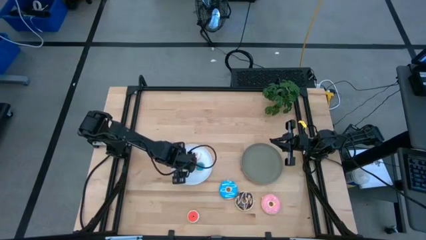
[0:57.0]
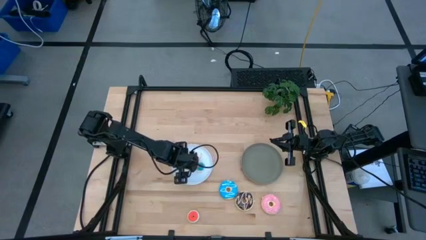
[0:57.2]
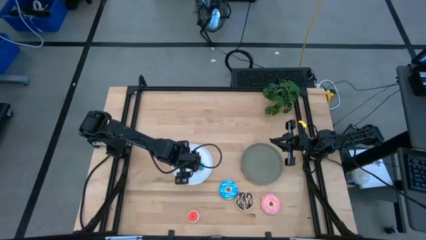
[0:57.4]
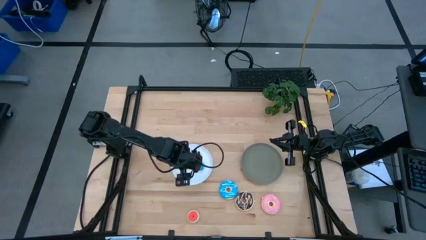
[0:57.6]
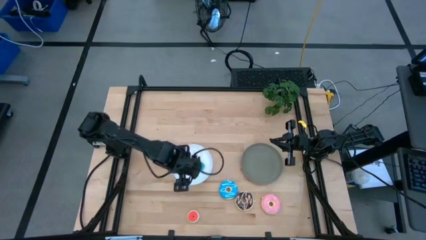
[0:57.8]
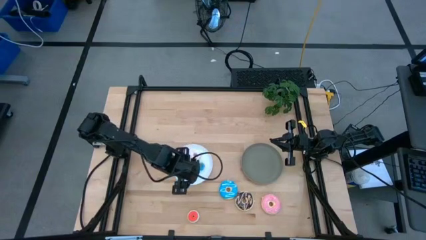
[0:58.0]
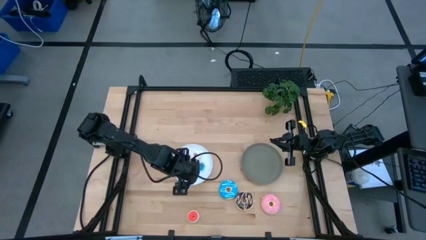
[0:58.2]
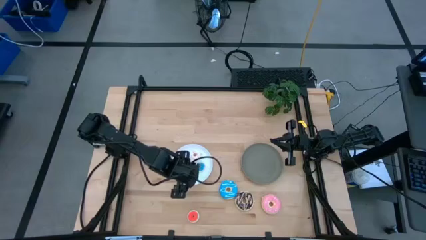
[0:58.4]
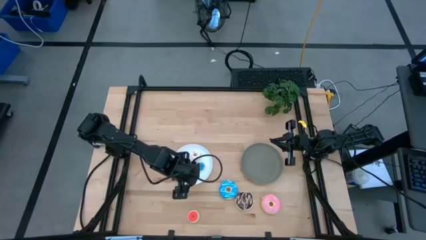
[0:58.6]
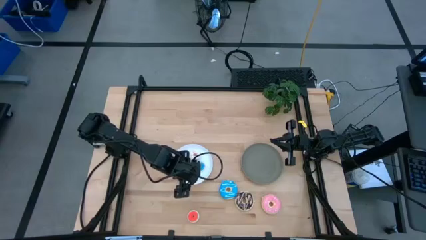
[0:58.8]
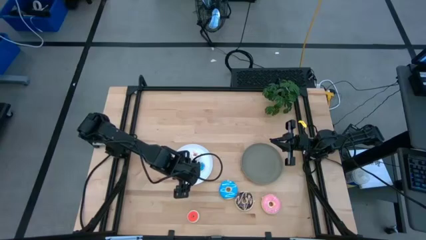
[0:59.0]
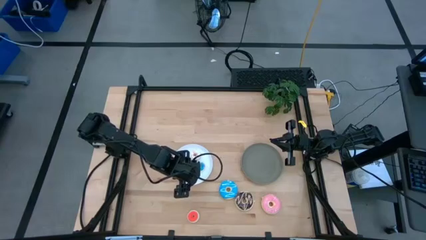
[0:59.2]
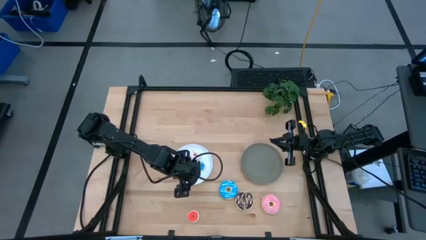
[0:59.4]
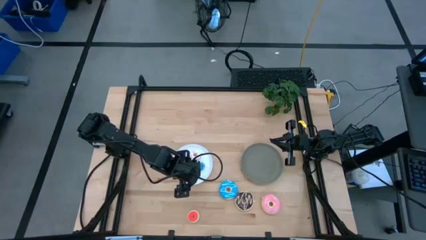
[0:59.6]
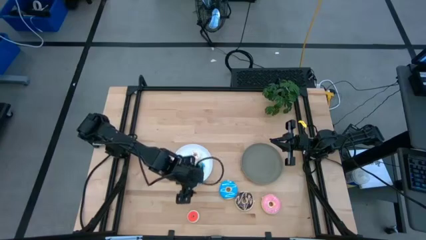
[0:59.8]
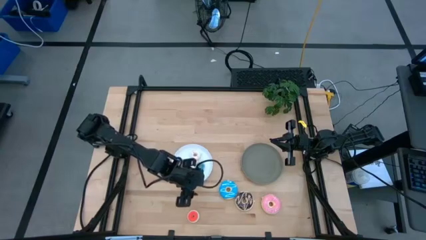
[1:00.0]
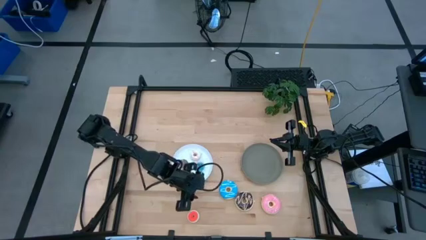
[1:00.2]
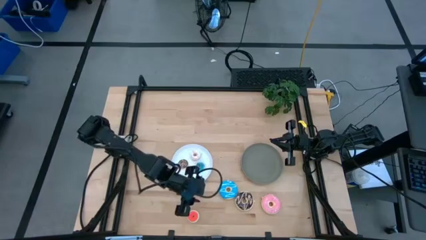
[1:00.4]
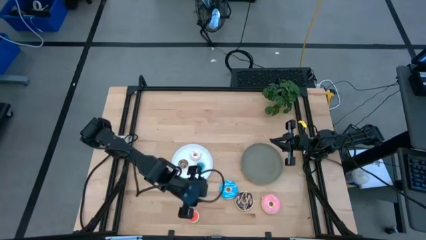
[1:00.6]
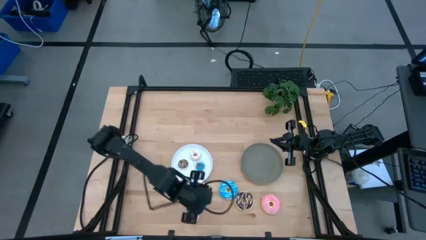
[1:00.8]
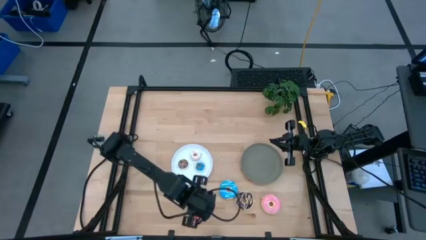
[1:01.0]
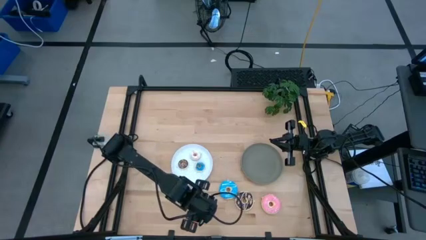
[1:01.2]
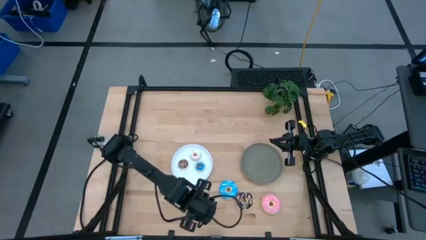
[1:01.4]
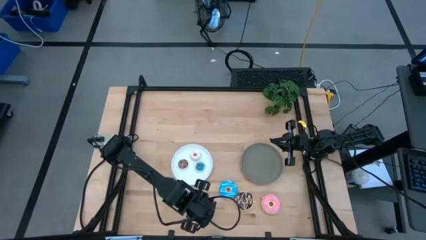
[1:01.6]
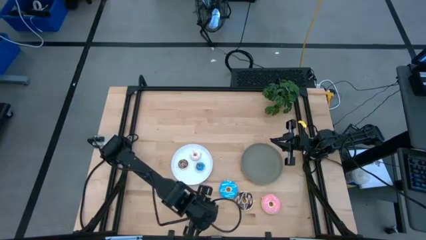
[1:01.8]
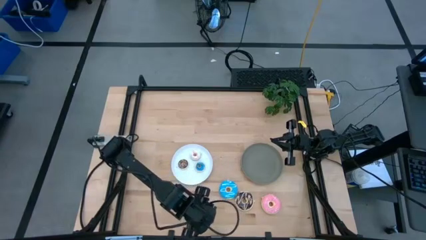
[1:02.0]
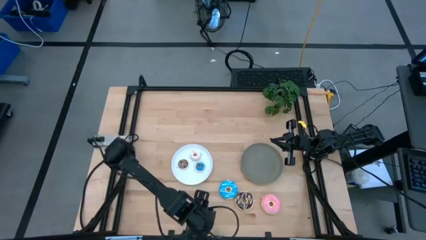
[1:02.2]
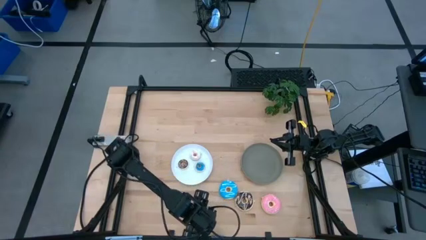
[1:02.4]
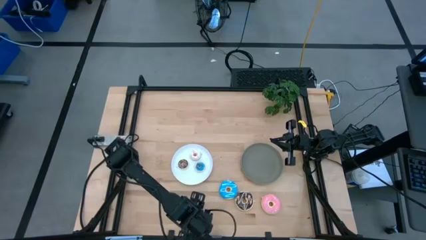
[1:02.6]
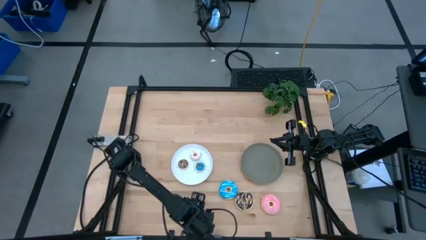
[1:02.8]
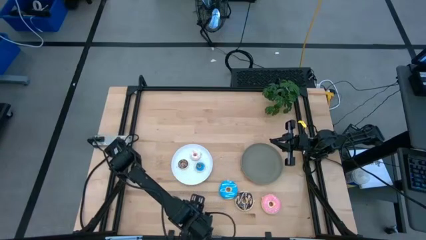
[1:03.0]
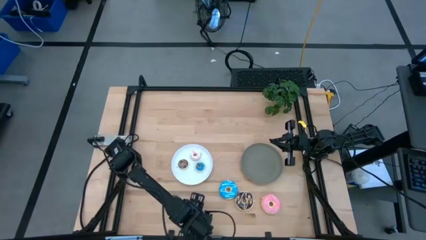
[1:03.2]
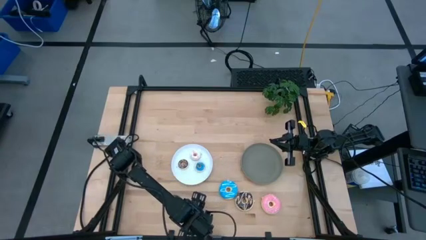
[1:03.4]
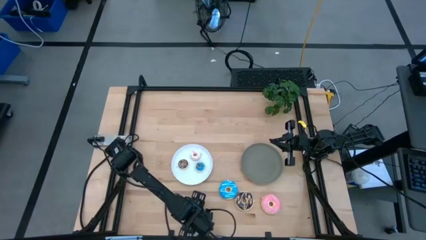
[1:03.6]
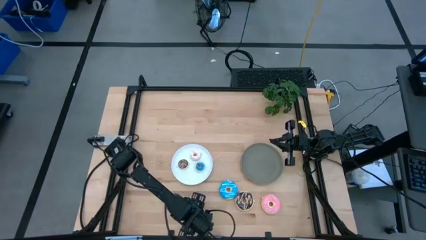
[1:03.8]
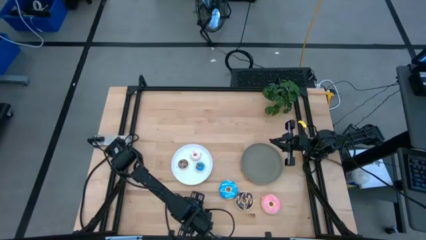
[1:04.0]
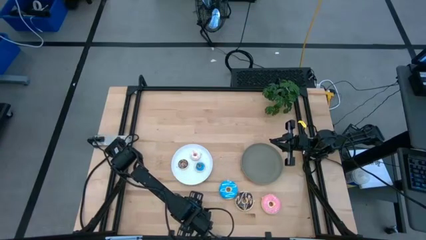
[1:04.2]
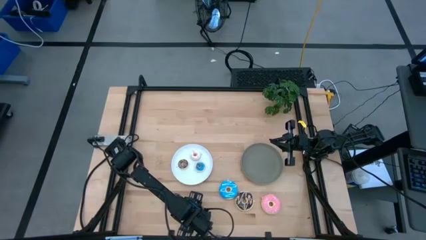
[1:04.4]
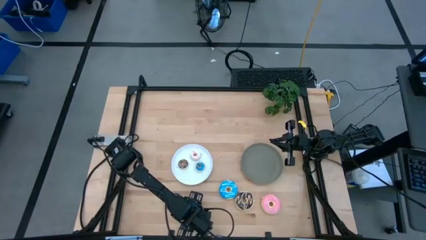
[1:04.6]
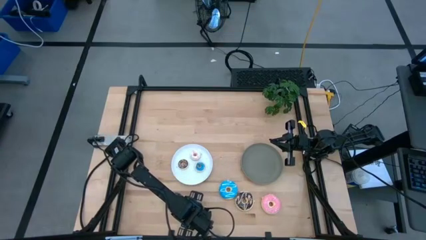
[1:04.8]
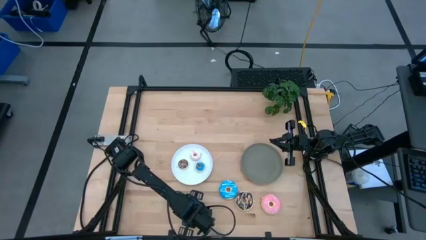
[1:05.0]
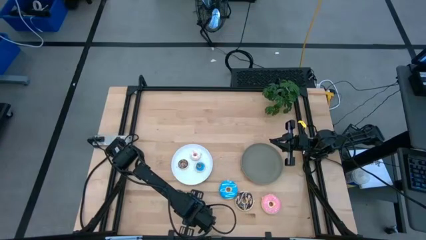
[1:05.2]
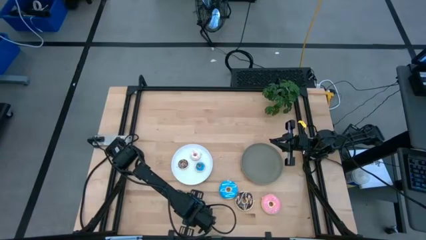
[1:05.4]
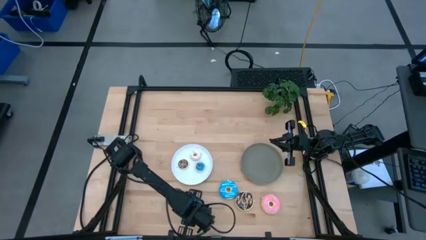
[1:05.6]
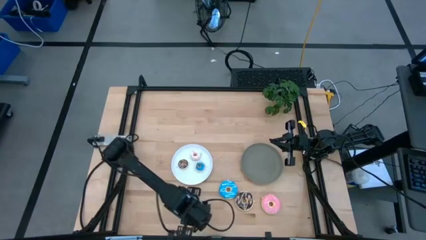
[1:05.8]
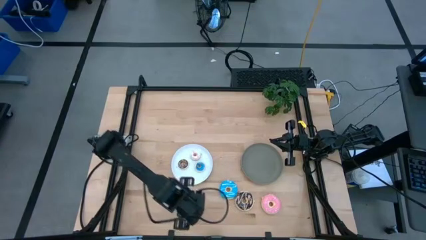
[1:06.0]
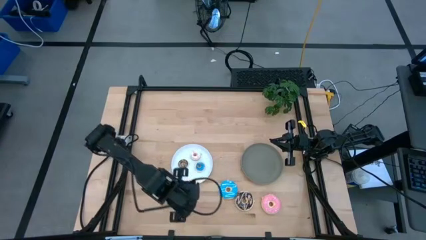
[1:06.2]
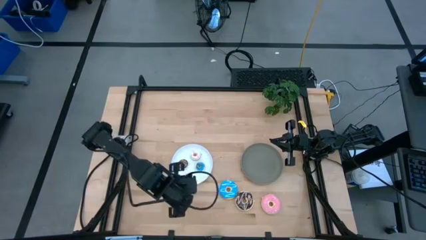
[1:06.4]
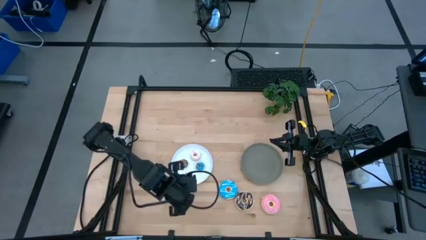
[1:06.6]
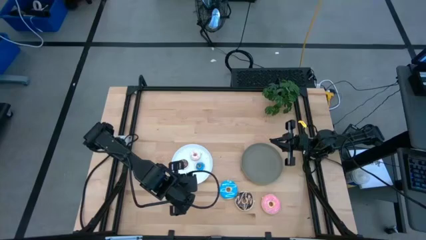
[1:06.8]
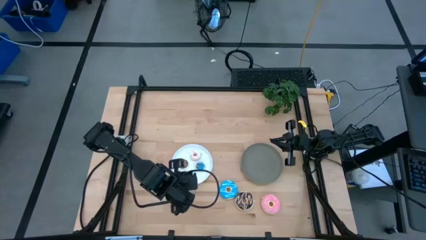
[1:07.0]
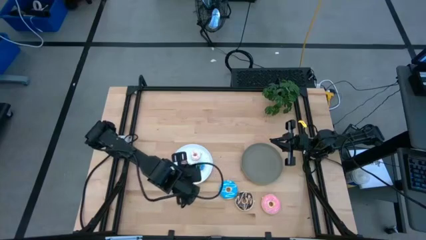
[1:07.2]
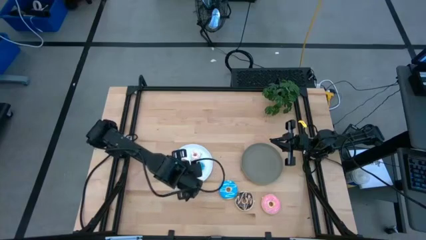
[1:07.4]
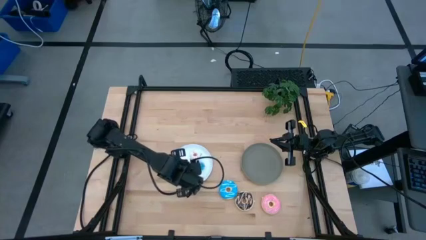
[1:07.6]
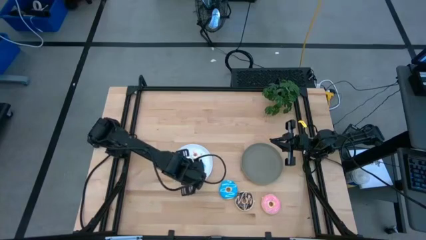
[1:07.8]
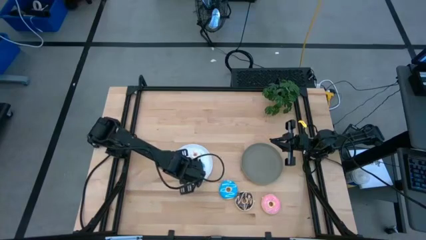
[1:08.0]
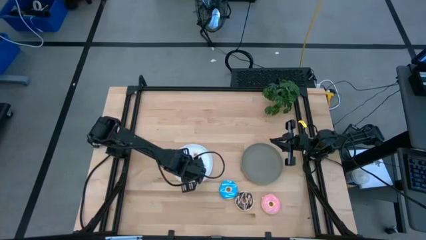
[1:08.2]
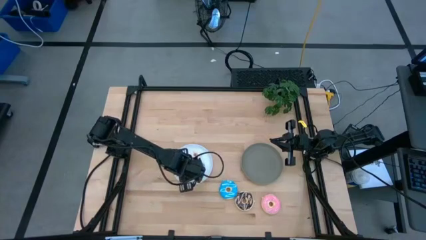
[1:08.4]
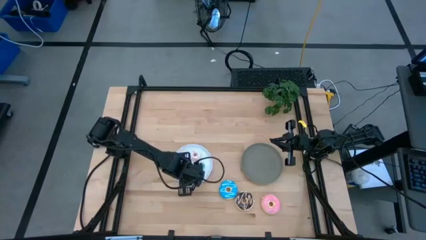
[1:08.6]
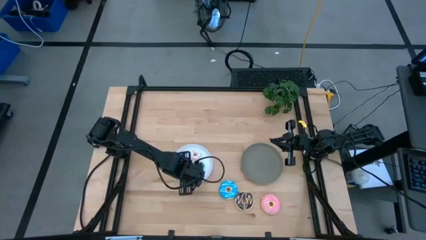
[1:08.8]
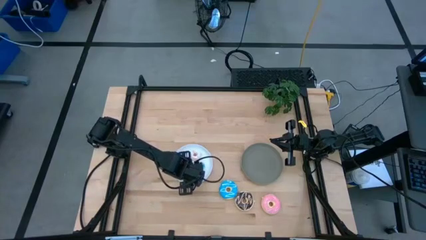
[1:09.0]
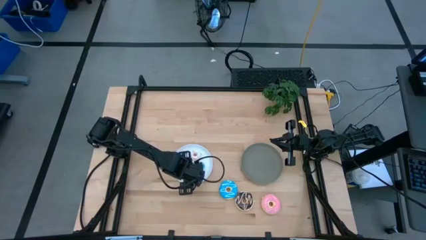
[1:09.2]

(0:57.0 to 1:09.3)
Task: Pick & Place donuts
Put the small red donut on the white plate

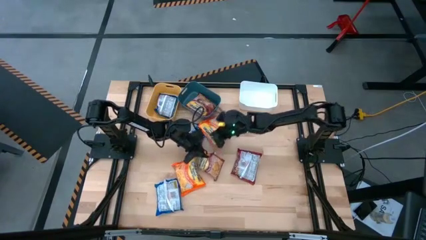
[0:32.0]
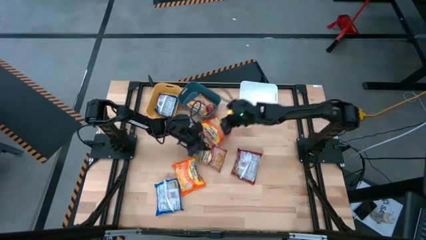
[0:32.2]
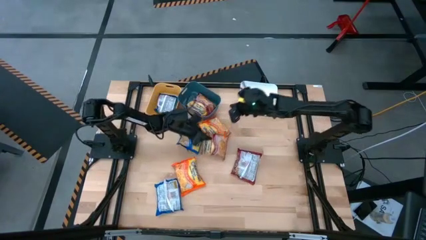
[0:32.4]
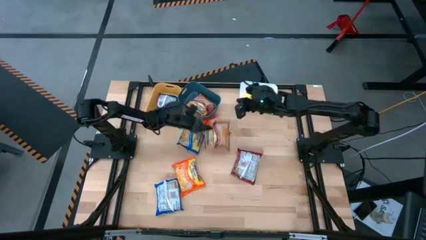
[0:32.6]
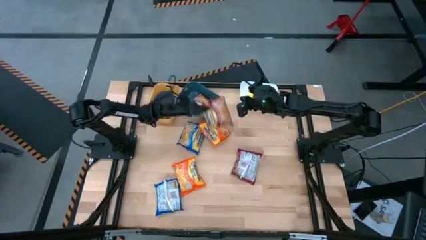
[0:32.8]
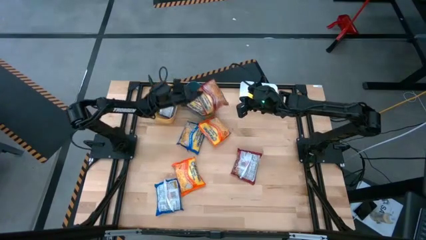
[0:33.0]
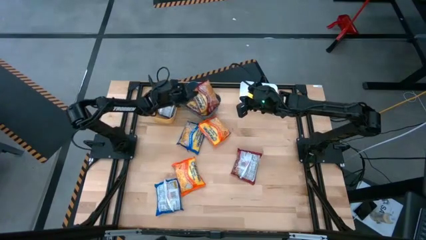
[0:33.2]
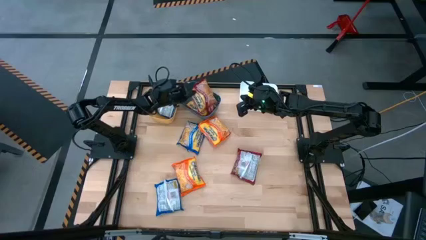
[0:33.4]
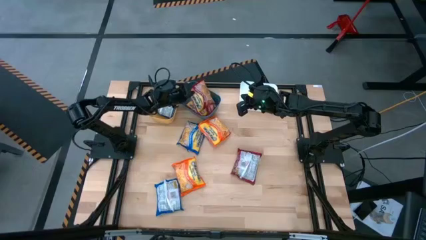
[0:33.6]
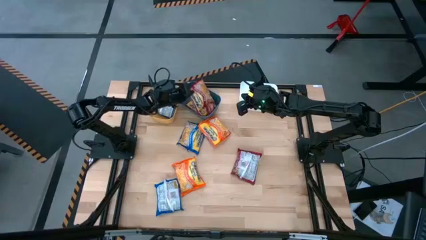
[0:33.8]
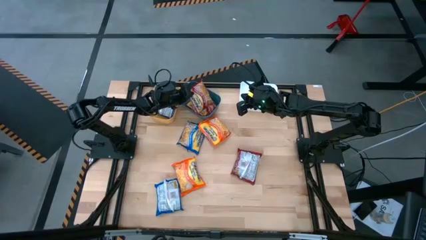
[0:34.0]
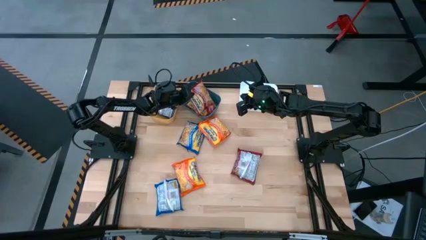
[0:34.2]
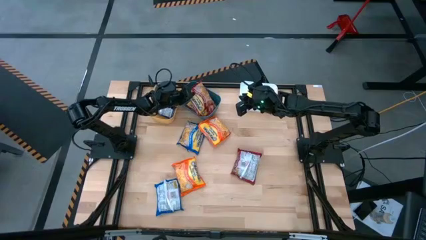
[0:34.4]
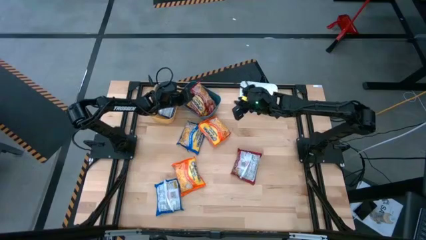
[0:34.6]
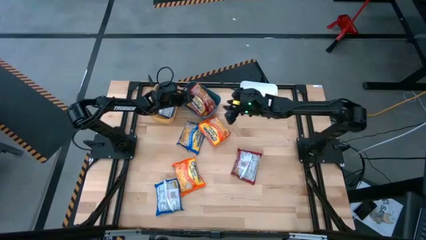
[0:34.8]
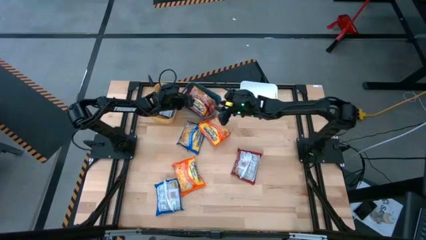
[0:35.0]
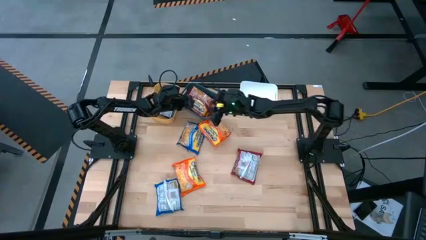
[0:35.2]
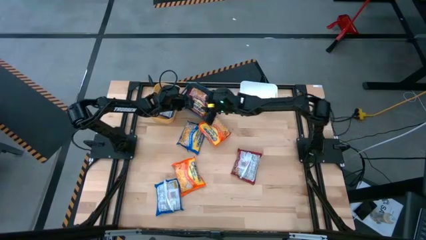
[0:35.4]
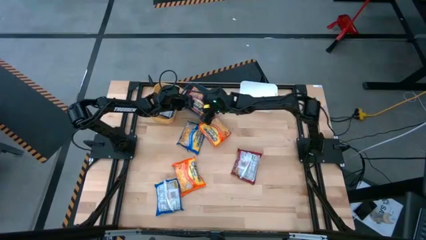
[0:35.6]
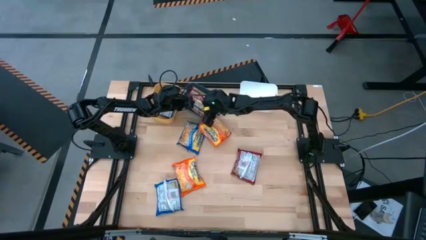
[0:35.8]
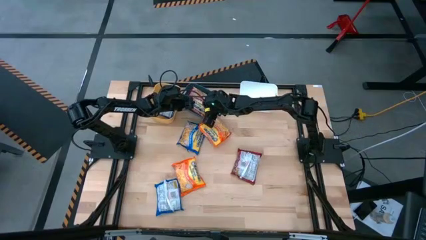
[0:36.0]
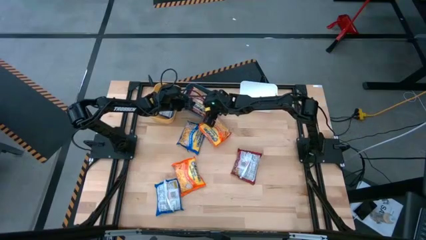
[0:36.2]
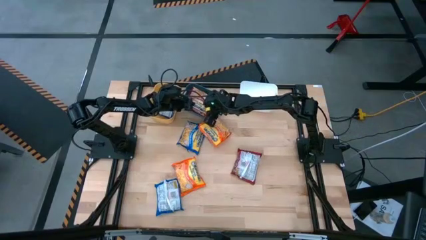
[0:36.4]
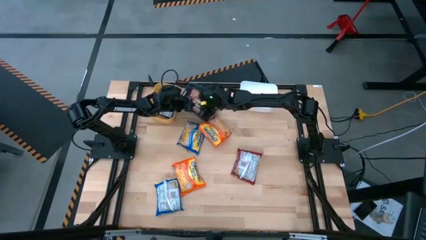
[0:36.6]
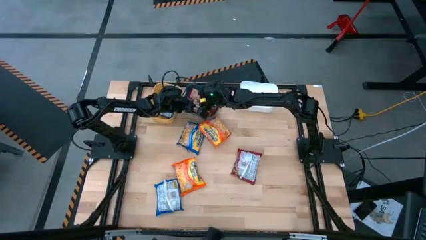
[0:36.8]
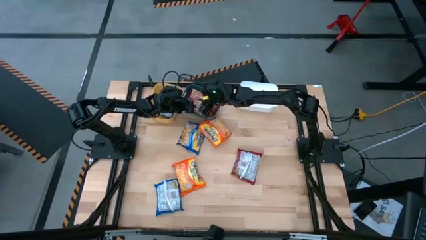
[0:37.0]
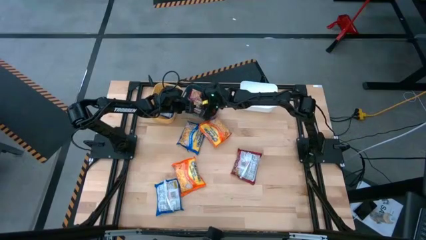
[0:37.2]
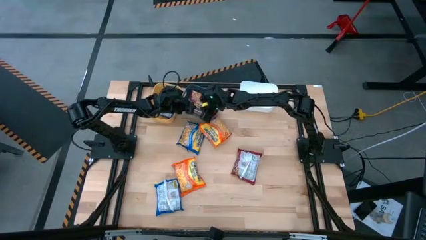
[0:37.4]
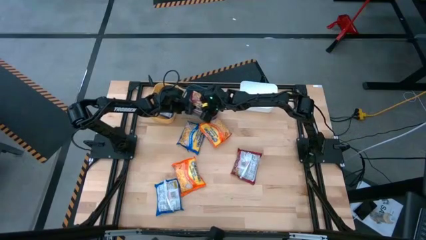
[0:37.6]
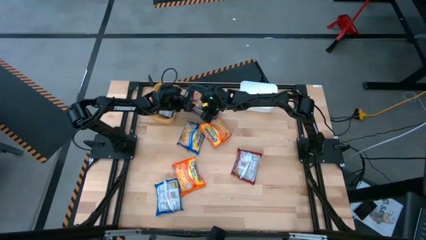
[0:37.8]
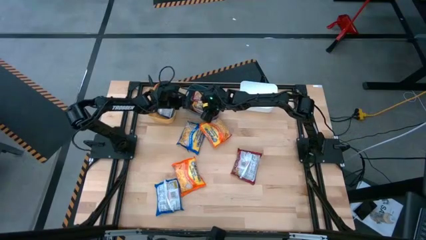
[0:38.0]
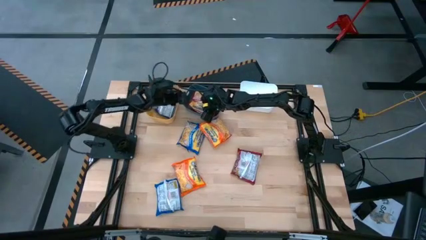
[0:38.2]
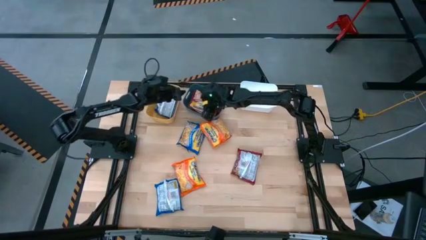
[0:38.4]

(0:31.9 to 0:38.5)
Task: Sort Maruchan noodles
Put the left red bag into the blue bin
